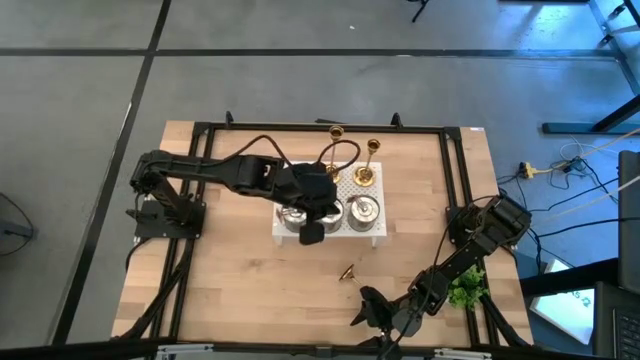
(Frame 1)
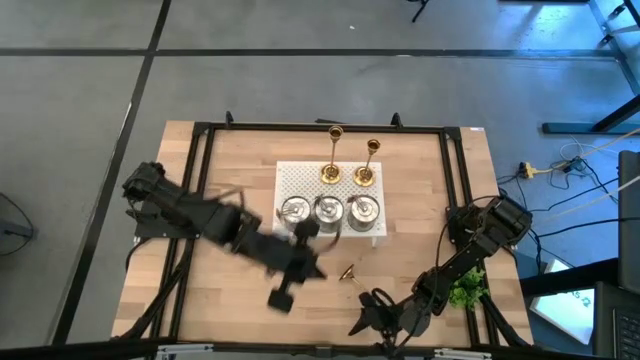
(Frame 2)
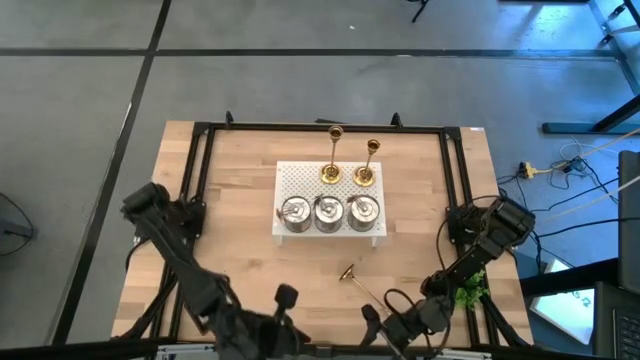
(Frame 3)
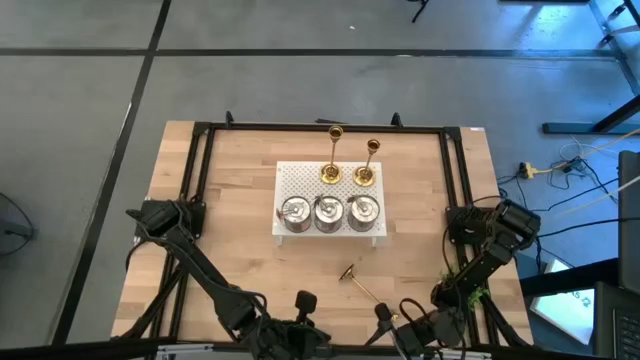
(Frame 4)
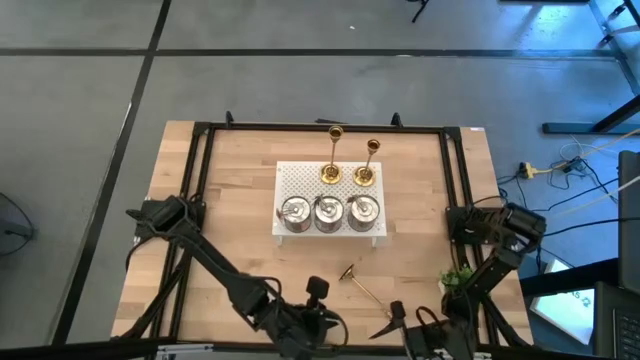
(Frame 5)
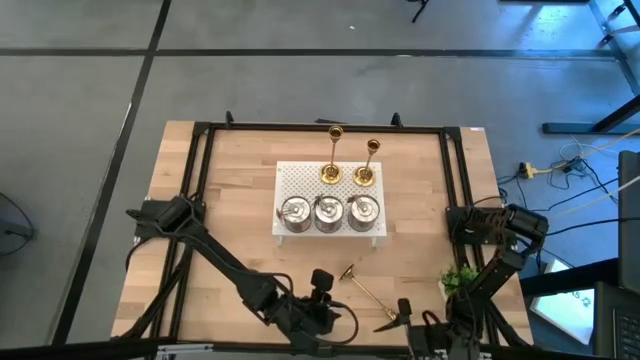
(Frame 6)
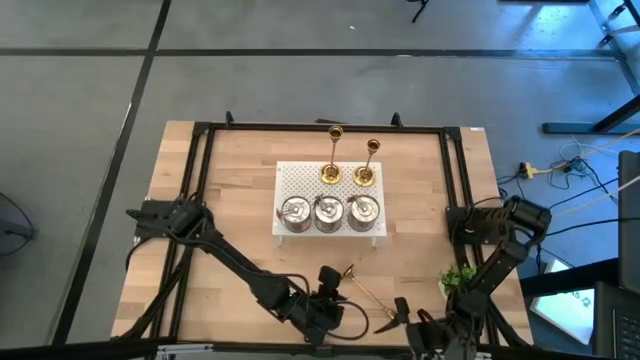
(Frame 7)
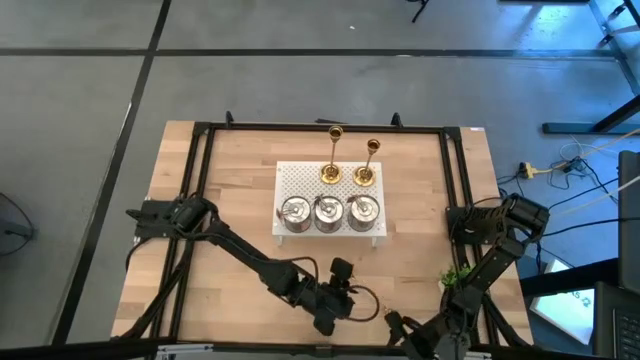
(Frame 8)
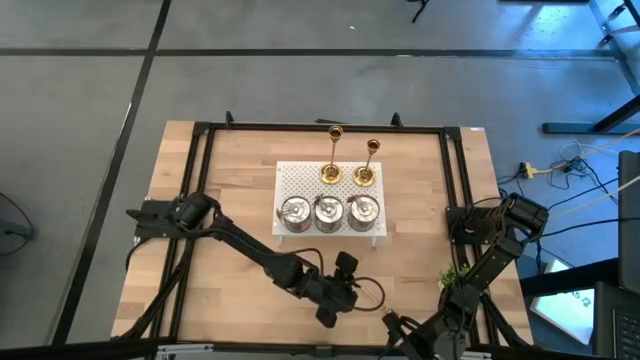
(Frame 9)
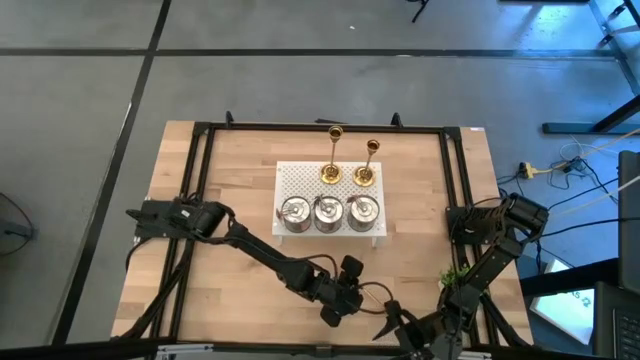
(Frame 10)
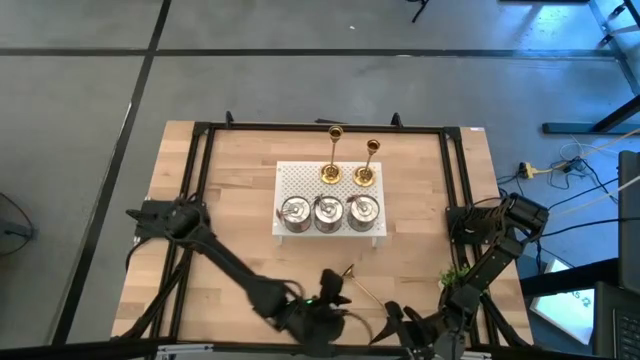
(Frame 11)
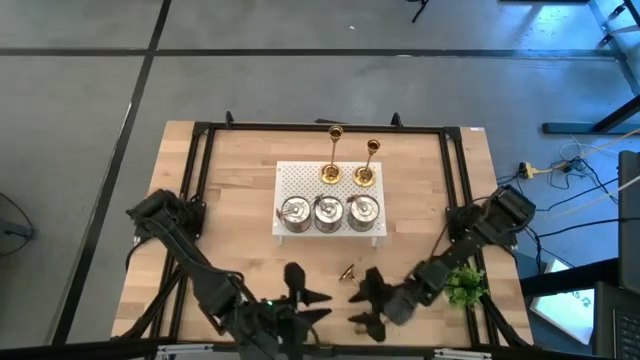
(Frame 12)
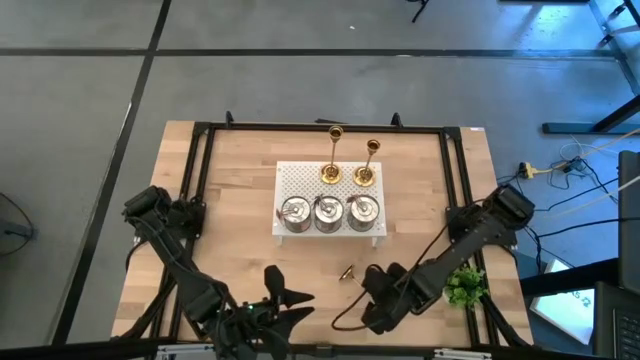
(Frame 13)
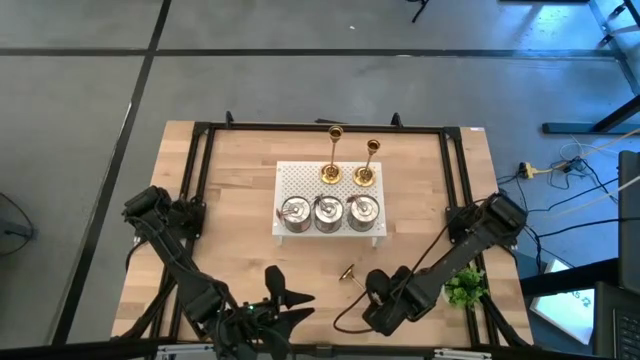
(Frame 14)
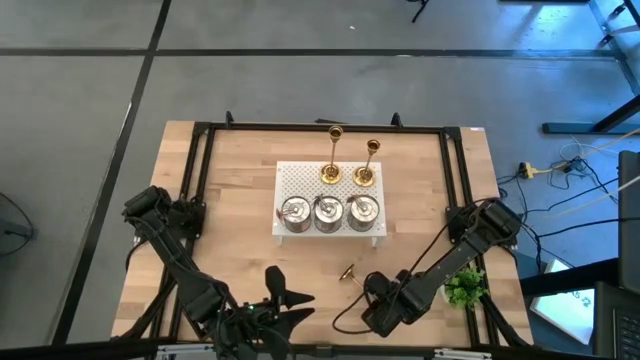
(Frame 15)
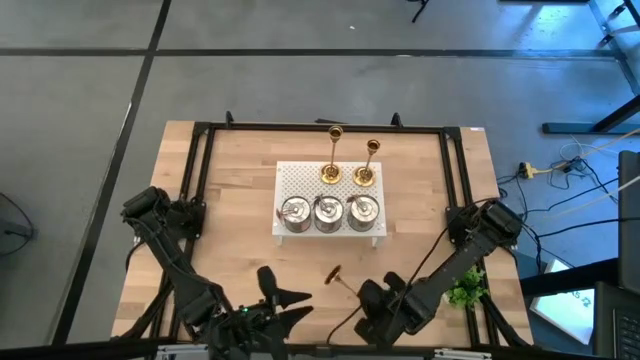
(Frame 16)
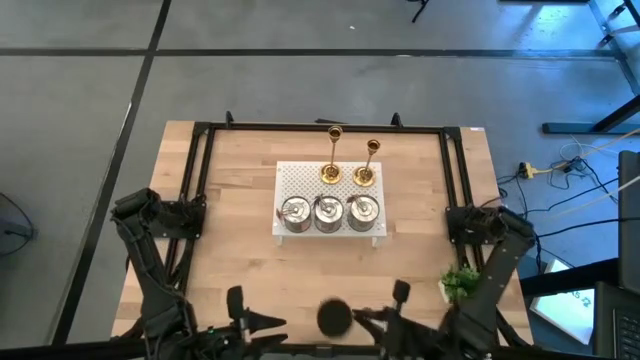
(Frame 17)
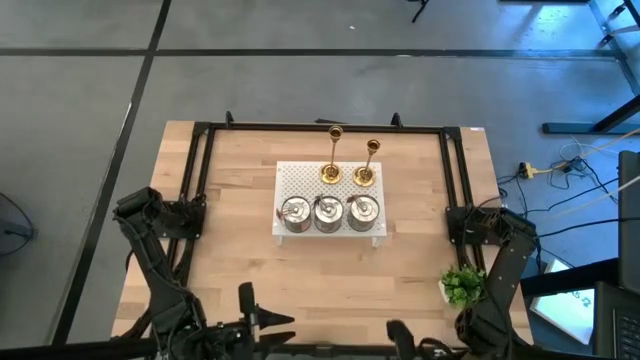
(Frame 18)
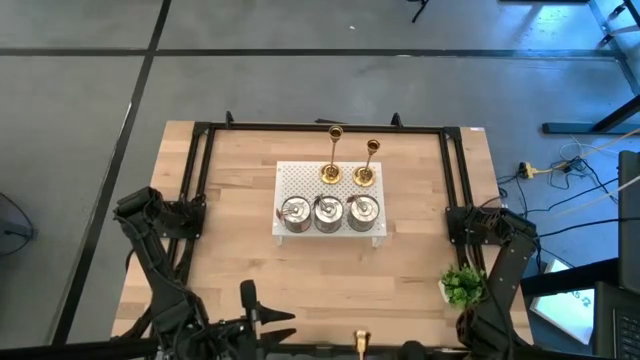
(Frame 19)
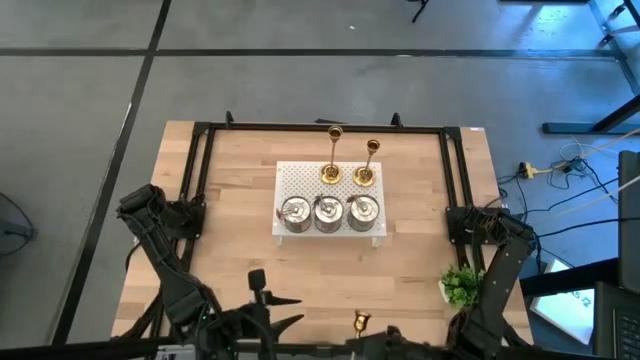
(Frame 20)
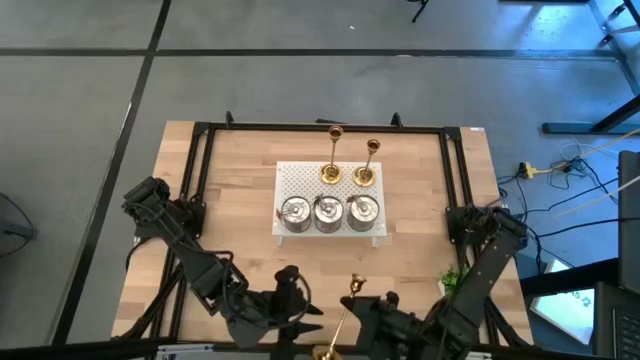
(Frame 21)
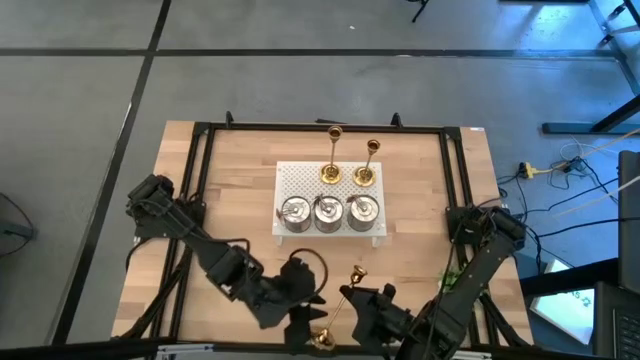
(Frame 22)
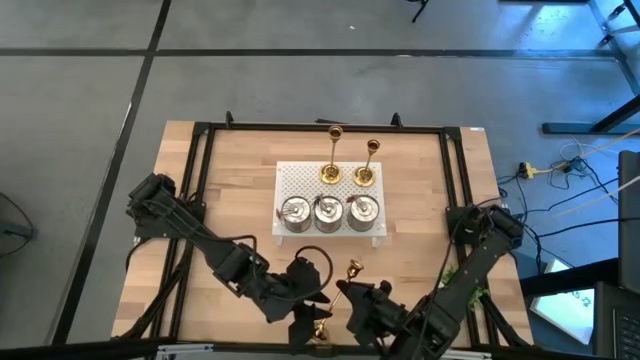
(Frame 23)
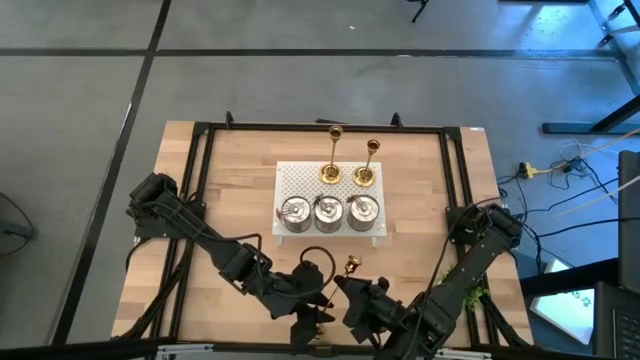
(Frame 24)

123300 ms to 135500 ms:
Task: Pick & Place candle stick holders
Put the gold candle holder on the shelf aligned with the other gold candle holders

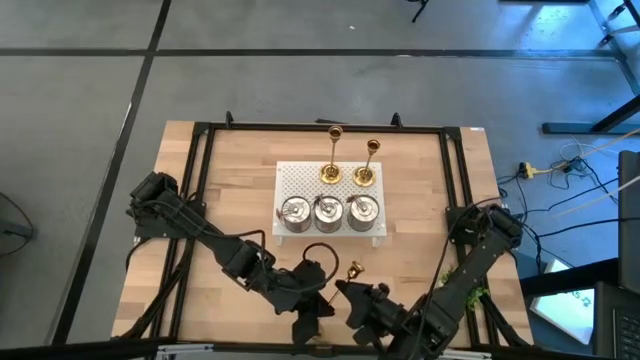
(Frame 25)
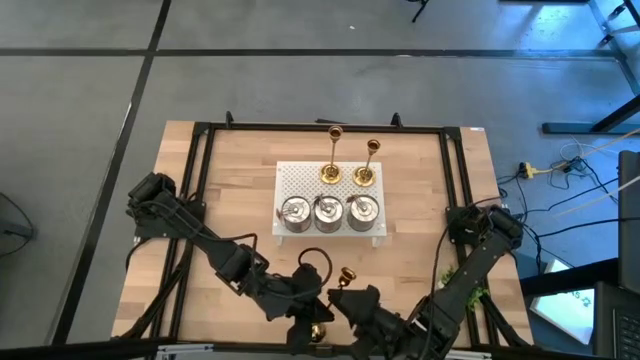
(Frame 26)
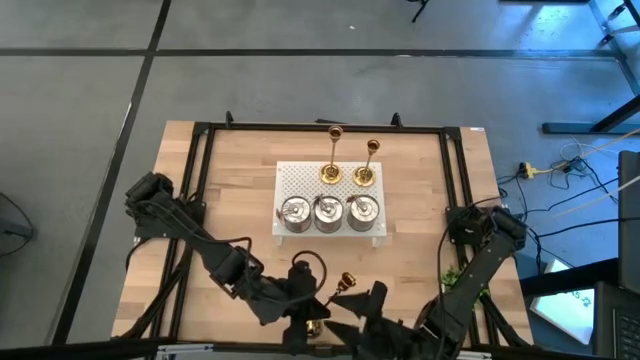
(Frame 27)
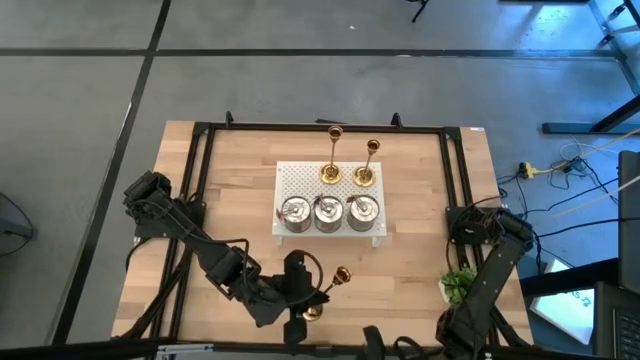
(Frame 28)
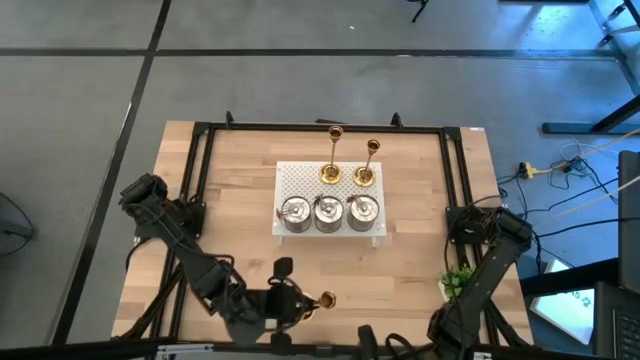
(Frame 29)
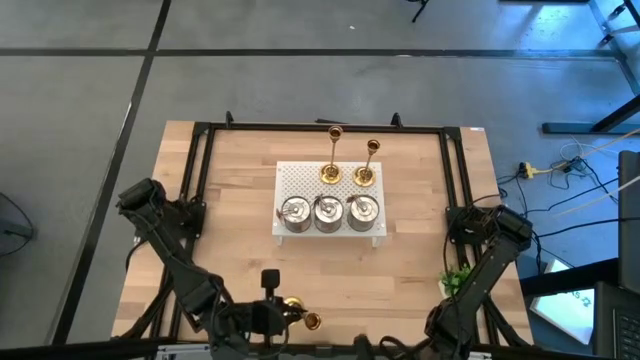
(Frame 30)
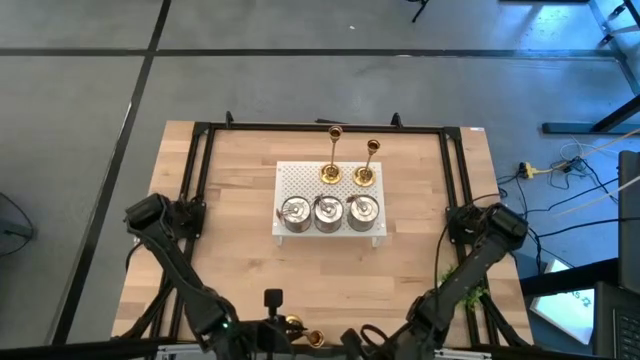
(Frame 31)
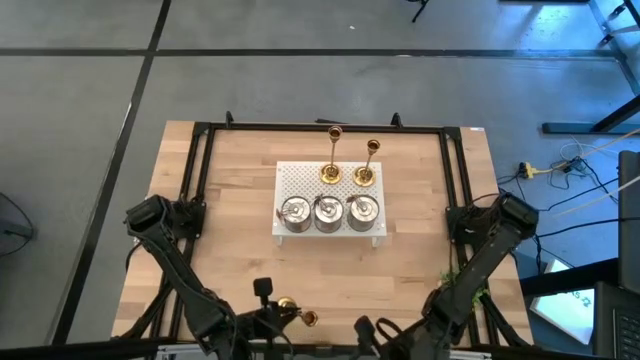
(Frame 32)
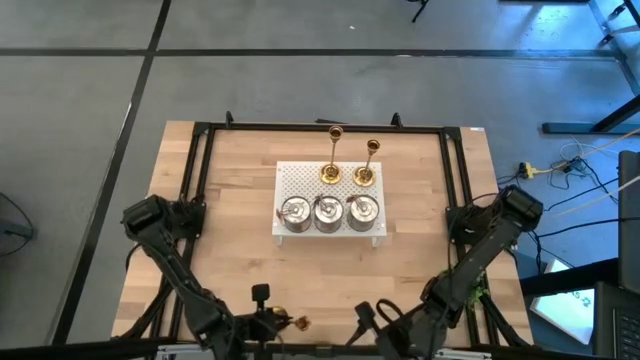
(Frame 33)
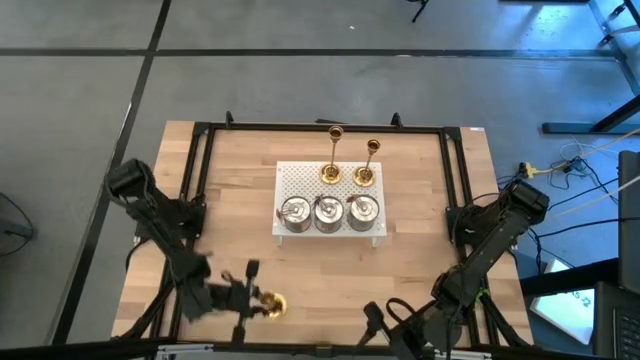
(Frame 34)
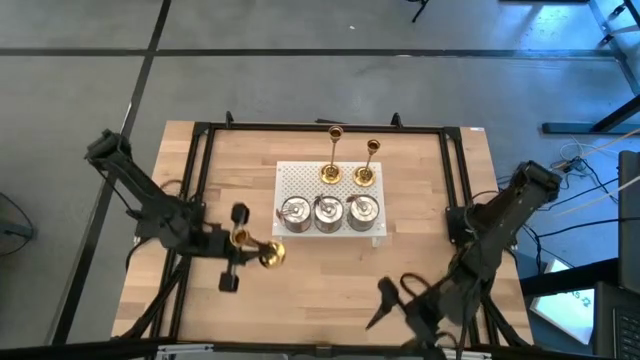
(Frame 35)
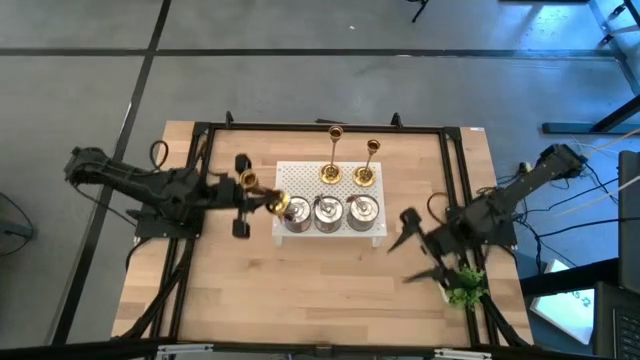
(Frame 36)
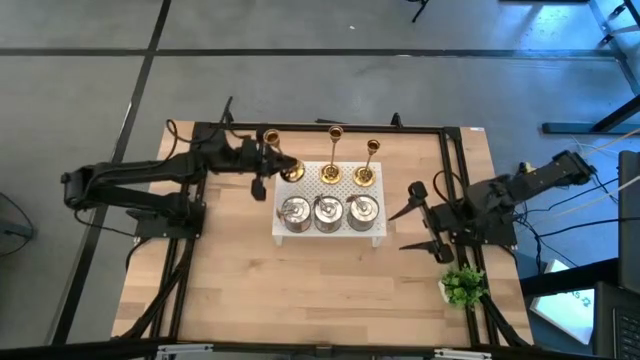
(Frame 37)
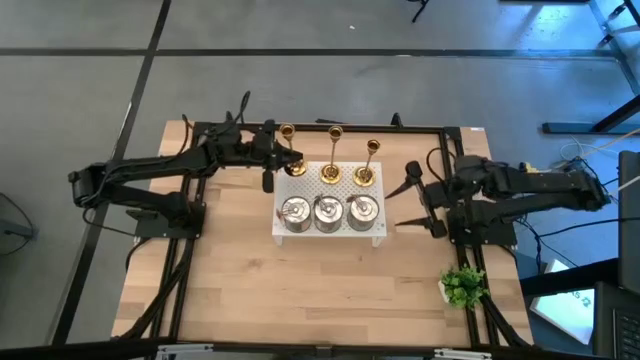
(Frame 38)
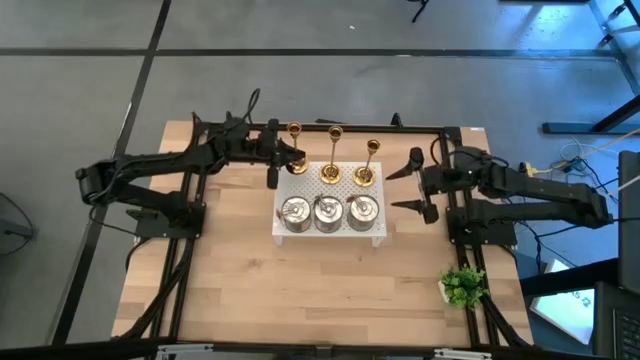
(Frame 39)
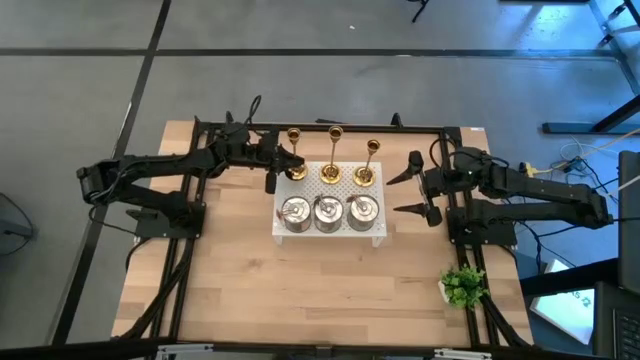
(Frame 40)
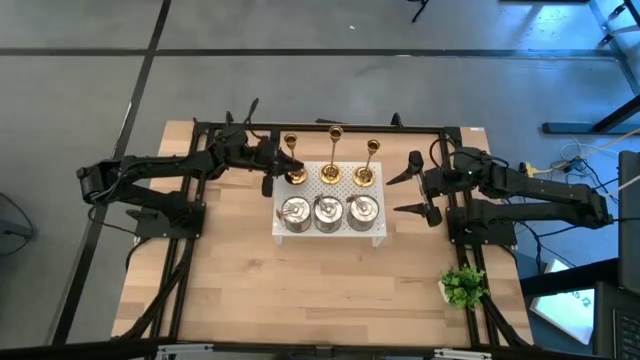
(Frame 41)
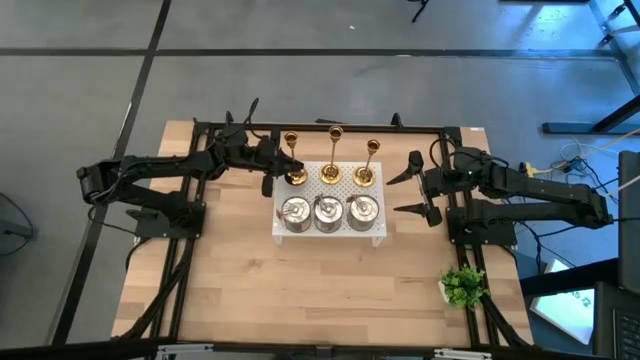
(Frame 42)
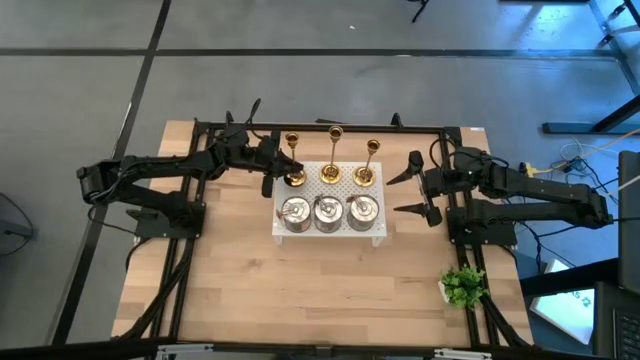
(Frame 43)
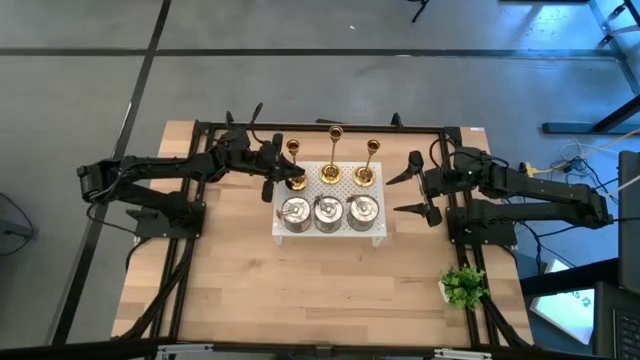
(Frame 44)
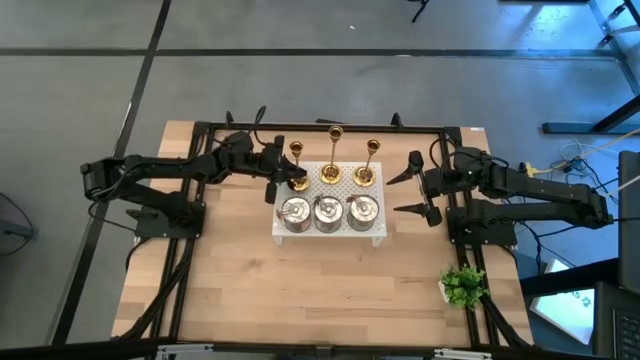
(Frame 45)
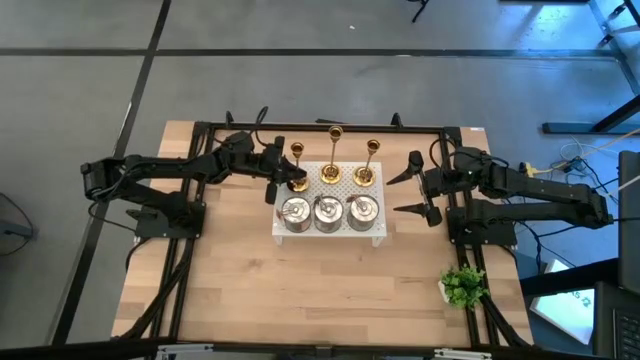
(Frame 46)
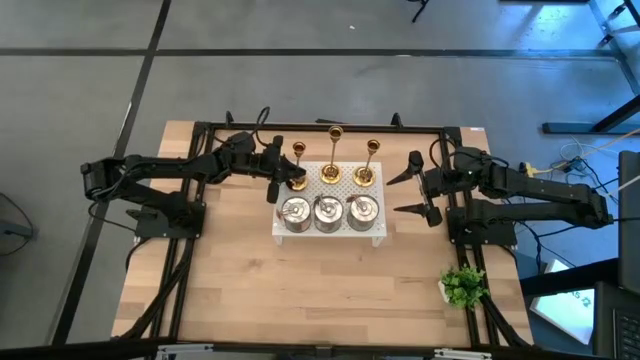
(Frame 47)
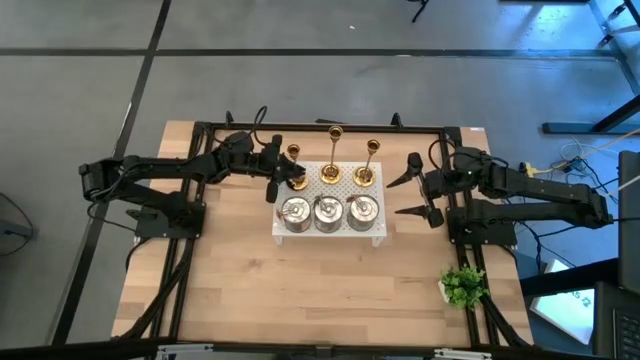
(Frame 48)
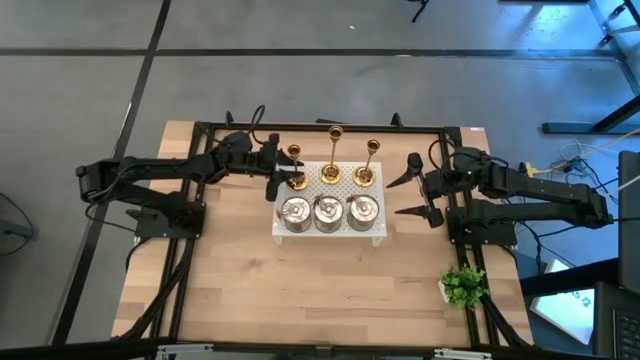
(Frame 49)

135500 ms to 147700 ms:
Put the gold candle holder on the shelf aligned with the other gold candle holders
